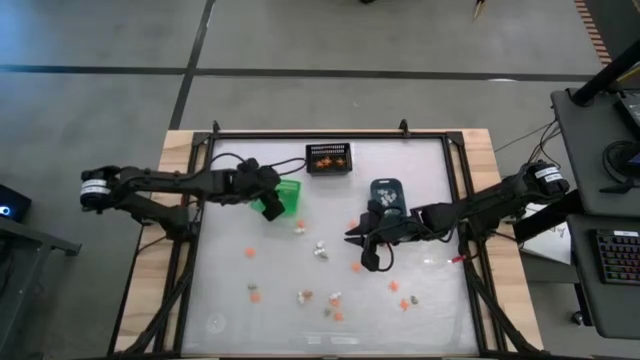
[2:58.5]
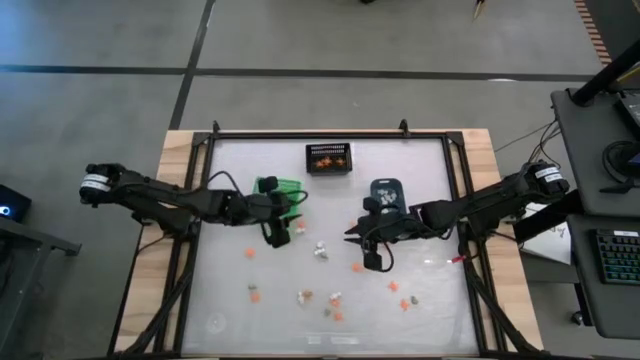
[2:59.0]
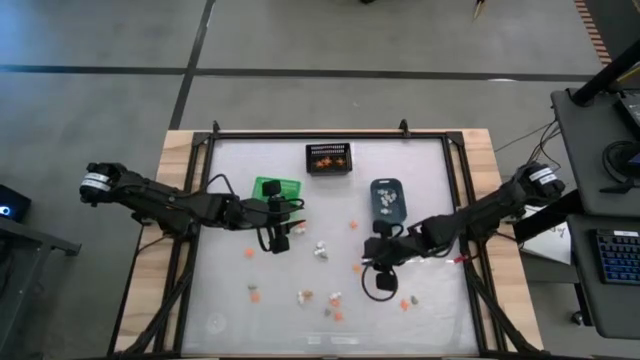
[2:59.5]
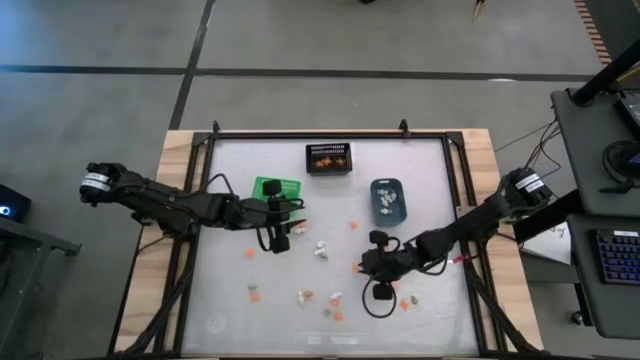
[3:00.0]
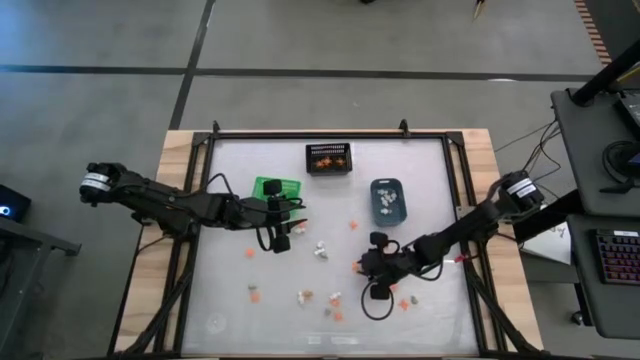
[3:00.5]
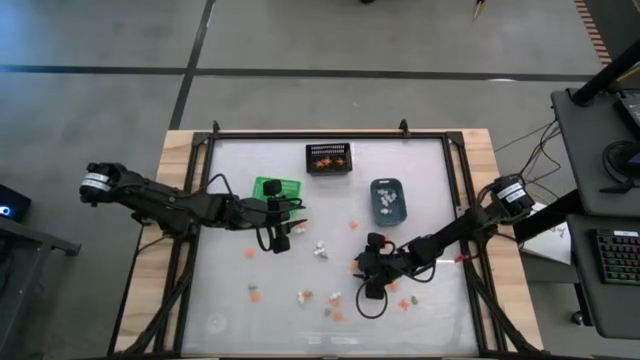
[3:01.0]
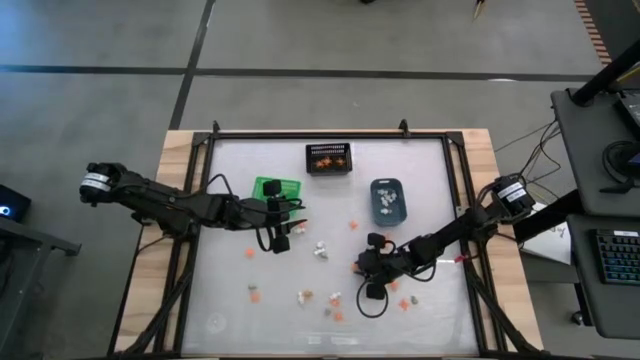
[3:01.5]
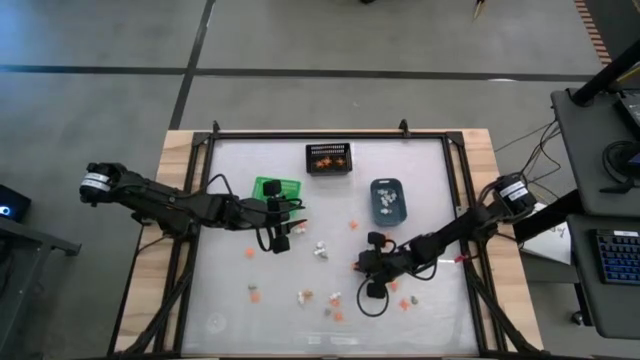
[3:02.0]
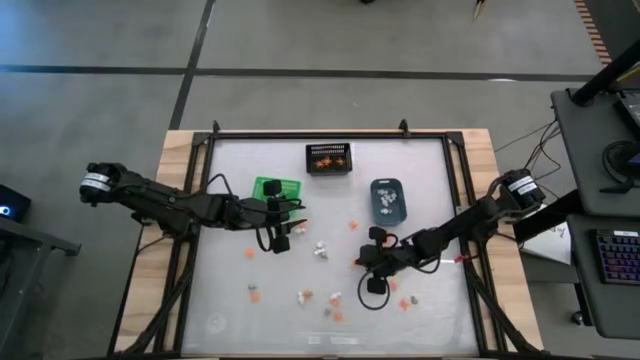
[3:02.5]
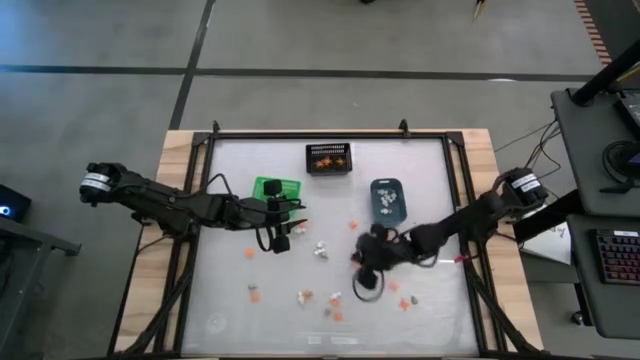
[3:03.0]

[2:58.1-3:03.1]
Task: Sort Halloween decoration
Put the orange spider toy into the black bin

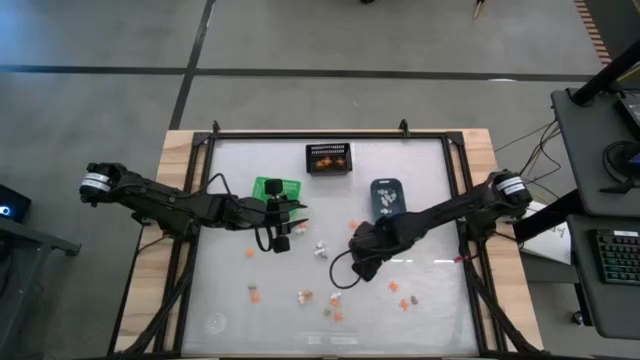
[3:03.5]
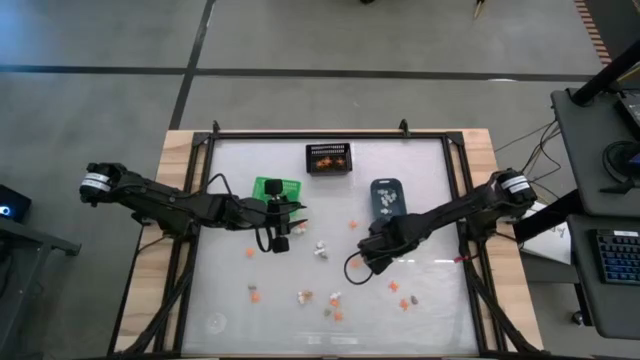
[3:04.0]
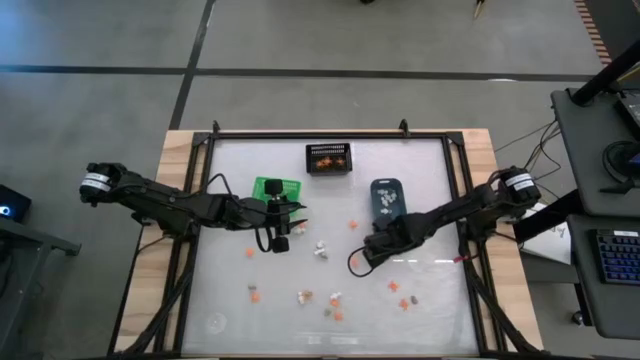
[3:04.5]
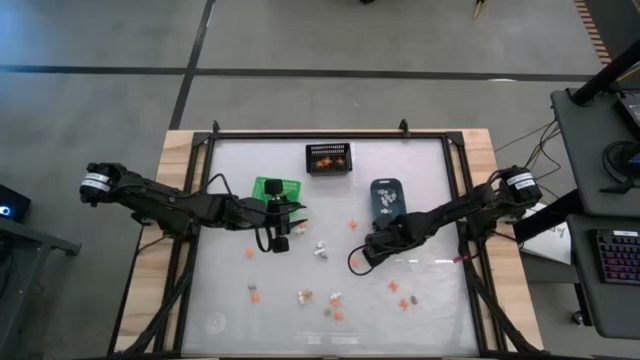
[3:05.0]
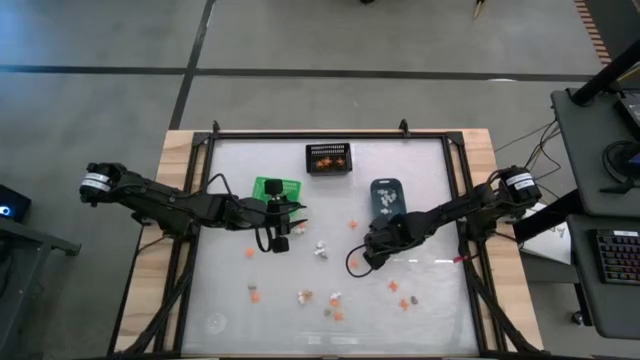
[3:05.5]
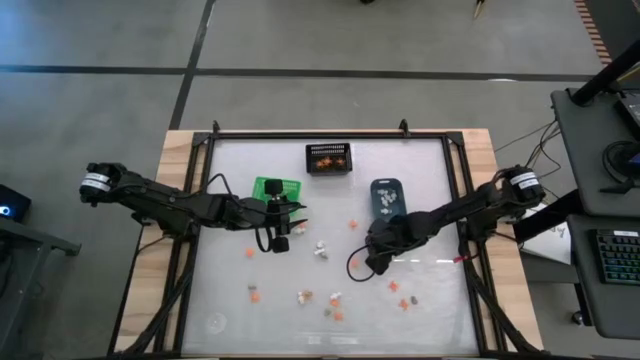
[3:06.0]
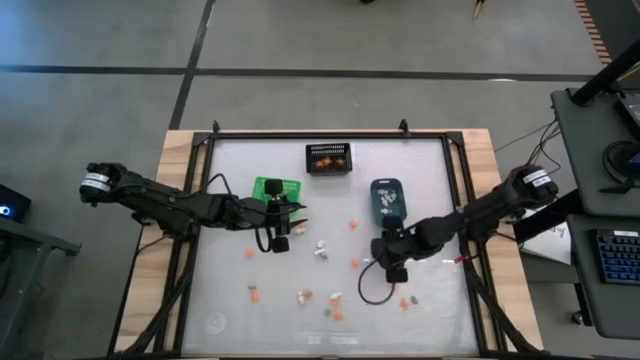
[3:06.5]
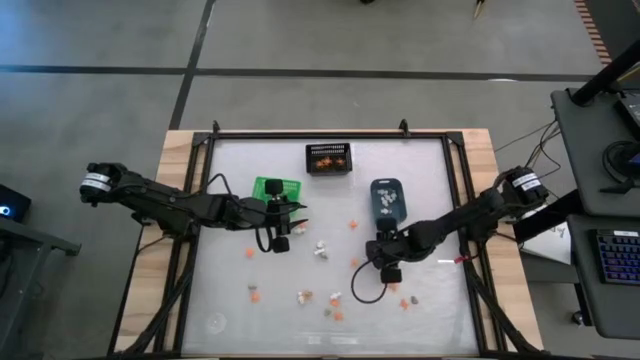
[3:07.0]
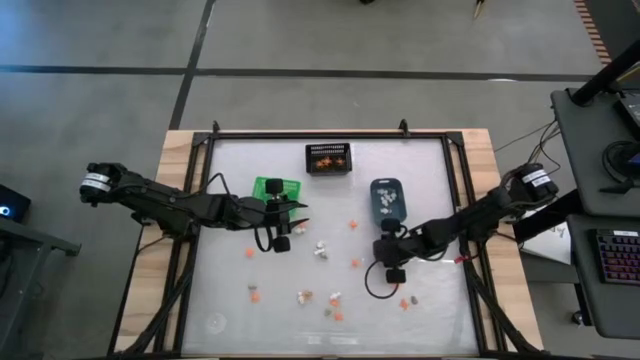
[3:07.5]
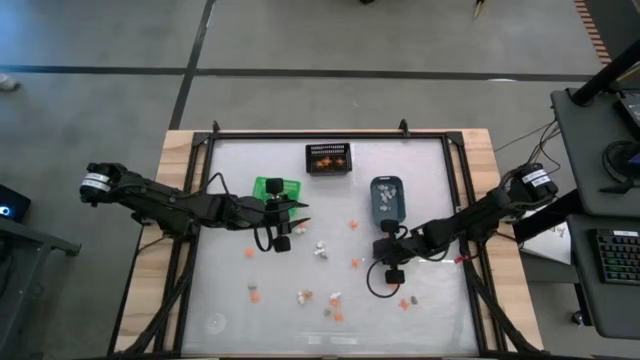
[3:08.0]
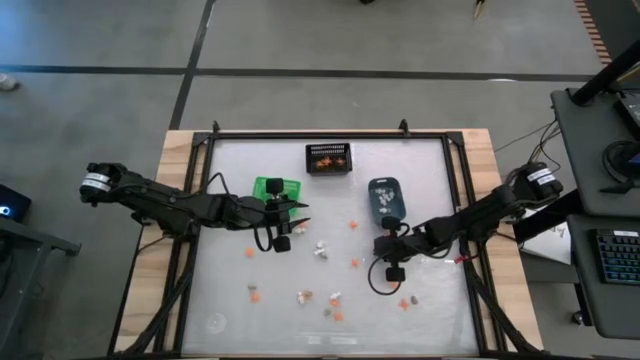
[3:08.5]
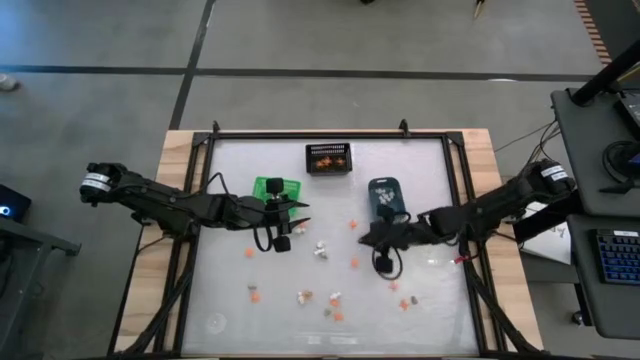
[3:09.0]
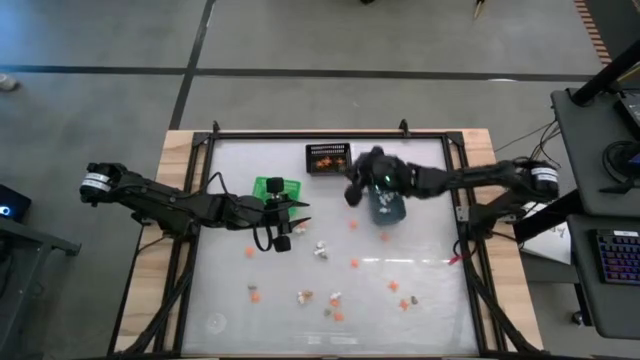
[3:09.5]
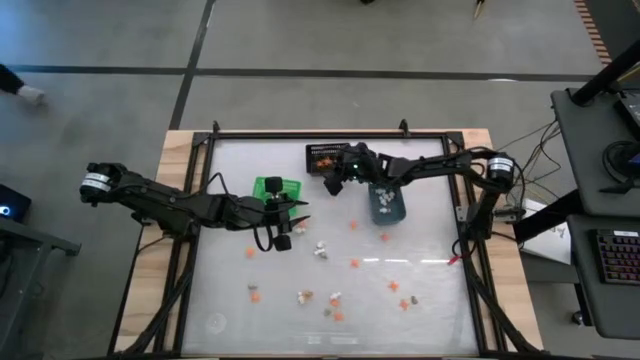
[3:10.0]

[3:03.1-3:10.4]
Put the orange spider toy into the black bin

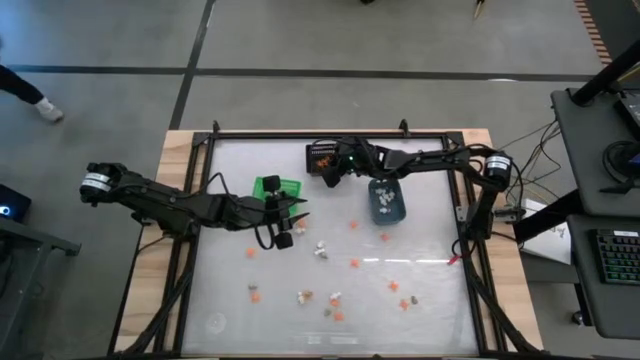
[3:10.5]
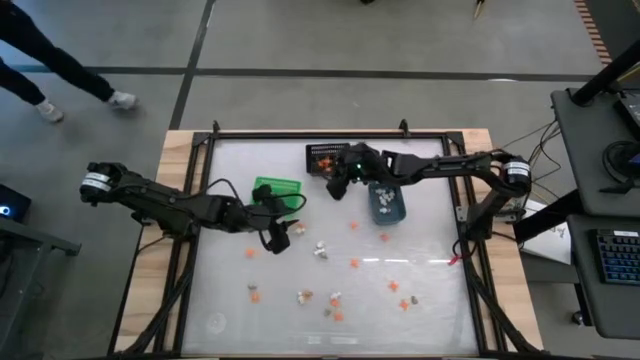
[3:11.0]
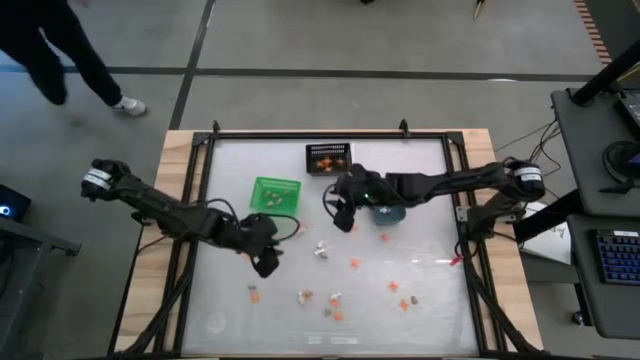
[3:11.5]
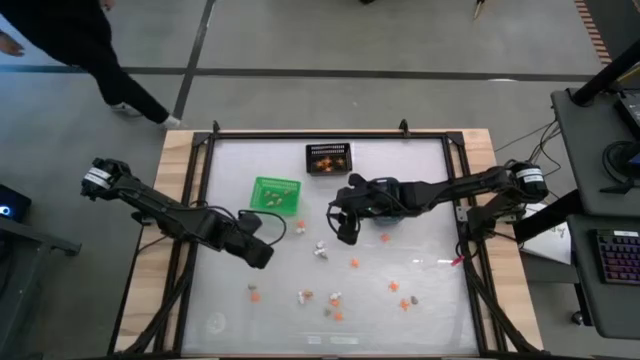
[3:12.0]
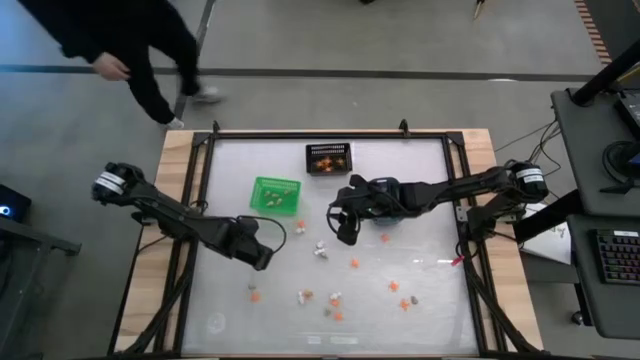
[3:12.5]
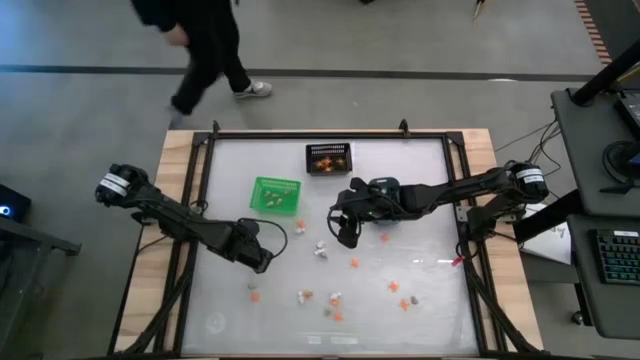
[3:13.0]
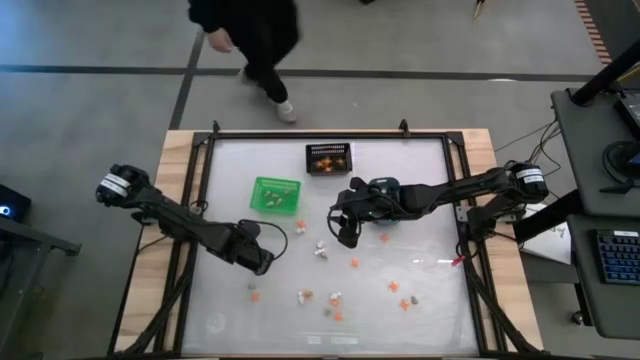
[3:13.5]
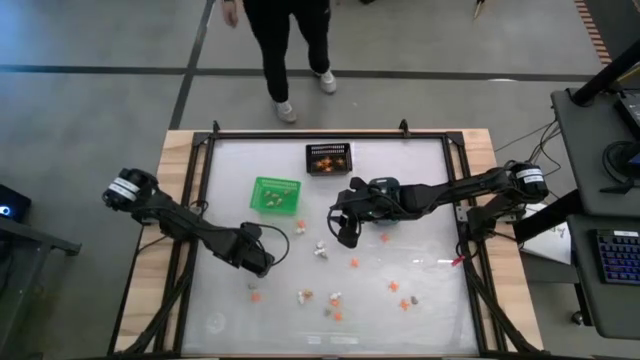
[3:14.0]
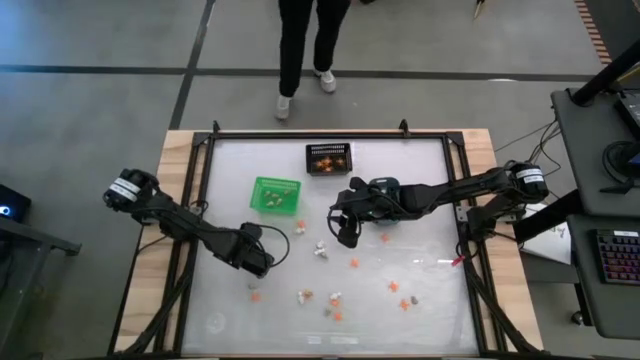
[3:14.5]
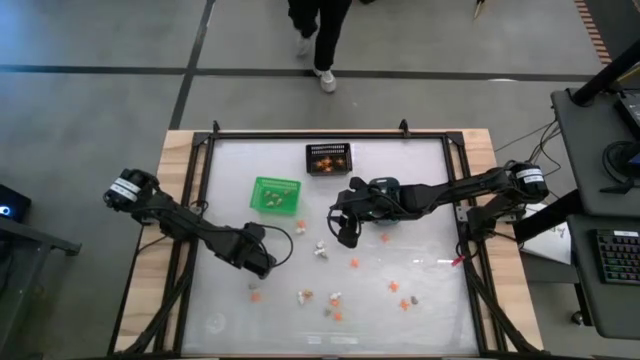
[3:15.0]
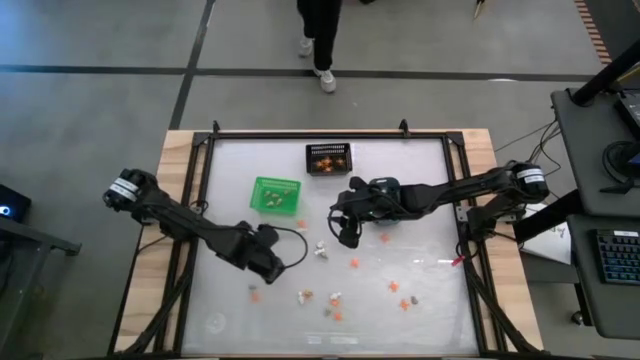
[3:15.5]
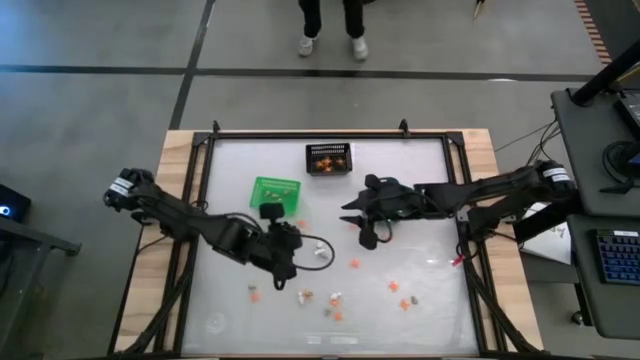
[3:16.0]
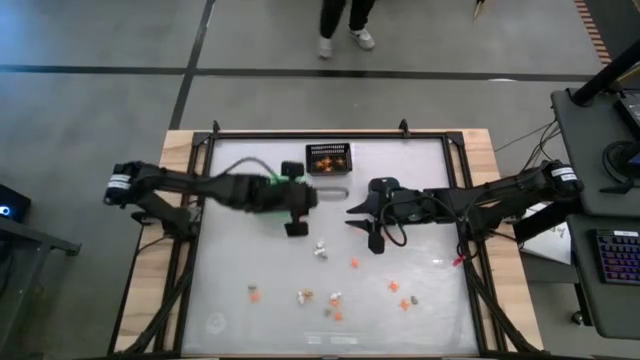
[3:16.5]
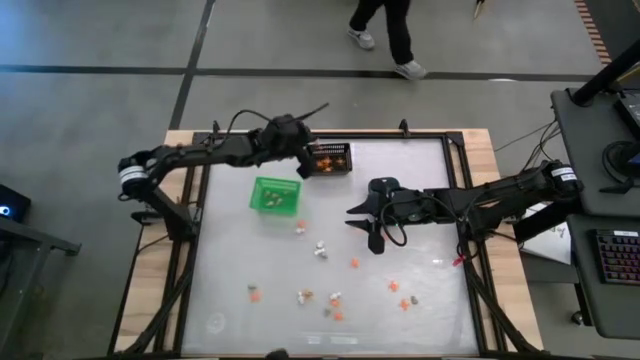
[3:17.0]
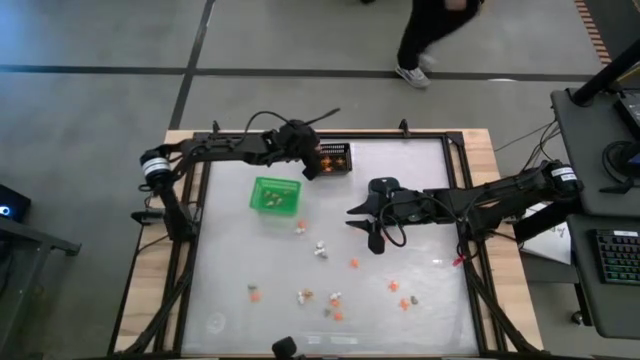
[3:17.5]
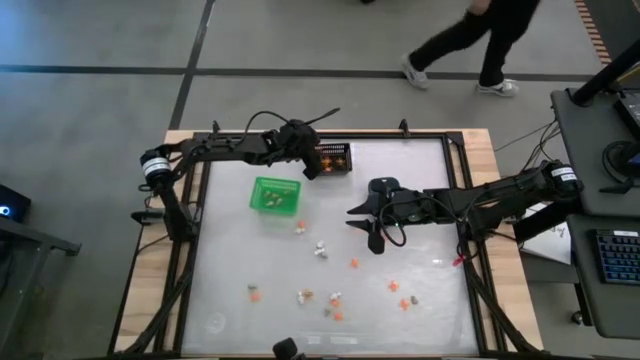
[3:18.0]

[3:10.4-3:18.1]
Put the orange spider toy into the black bin

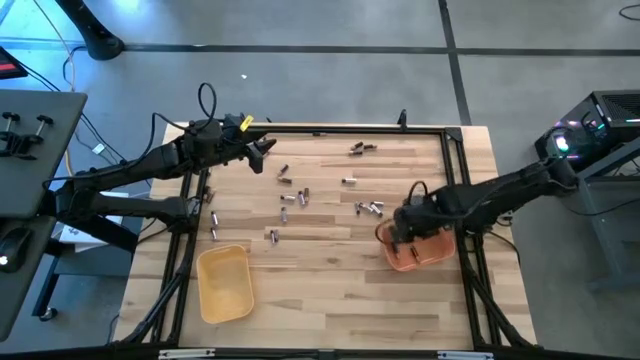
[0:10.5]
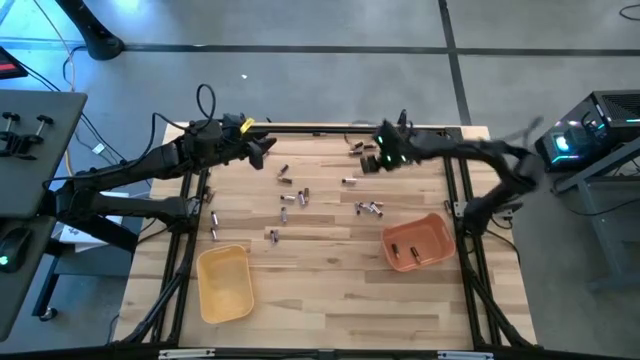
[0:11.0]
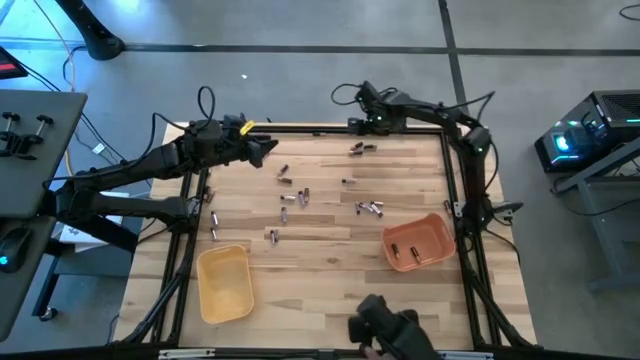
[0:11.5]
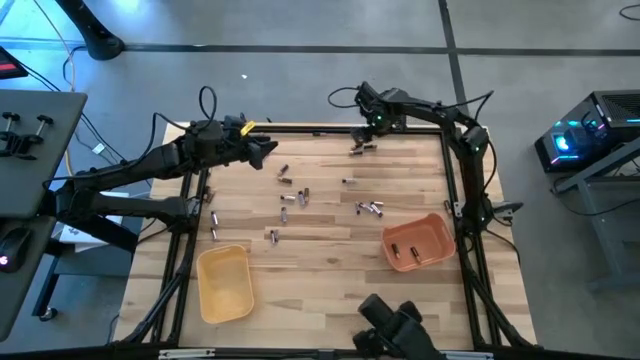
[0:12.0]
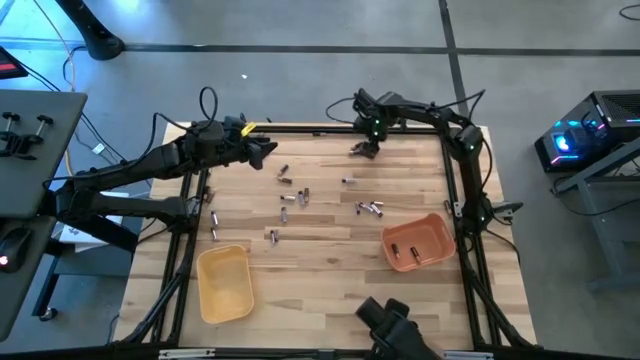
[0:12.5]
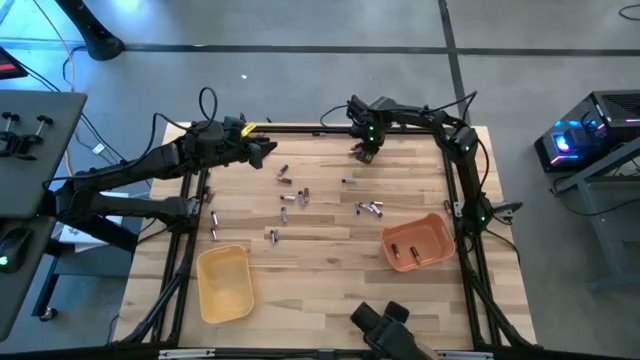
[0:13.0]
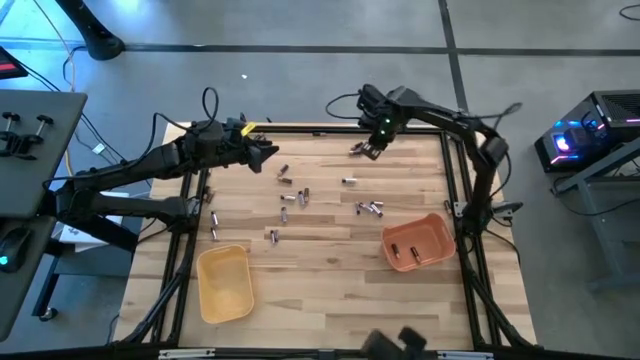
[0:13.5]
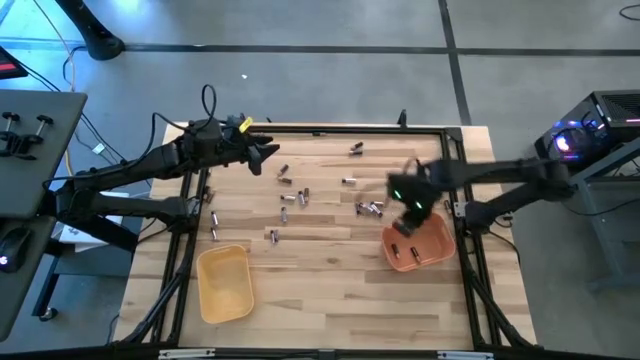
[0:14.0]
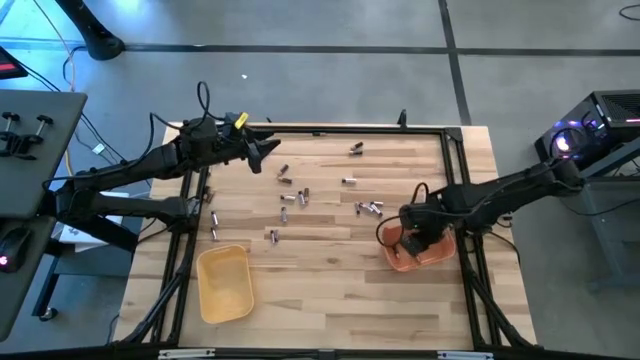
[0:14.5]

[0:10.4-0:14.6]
Task: Sort batteries
Put the black battery into the orange bin
